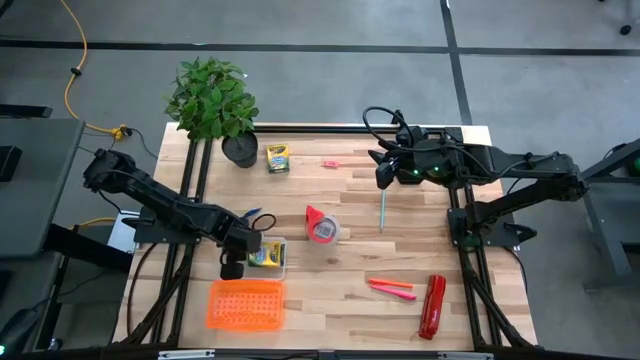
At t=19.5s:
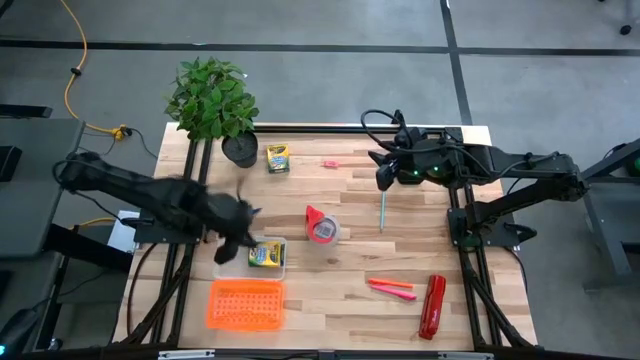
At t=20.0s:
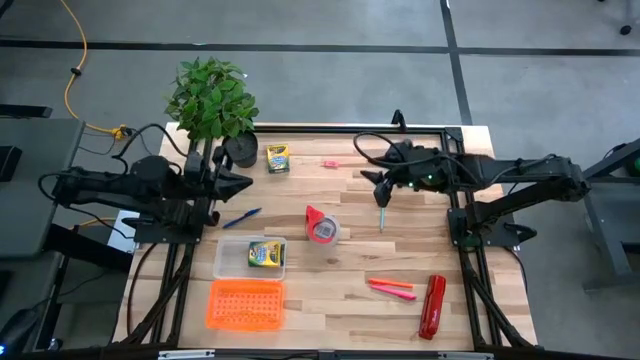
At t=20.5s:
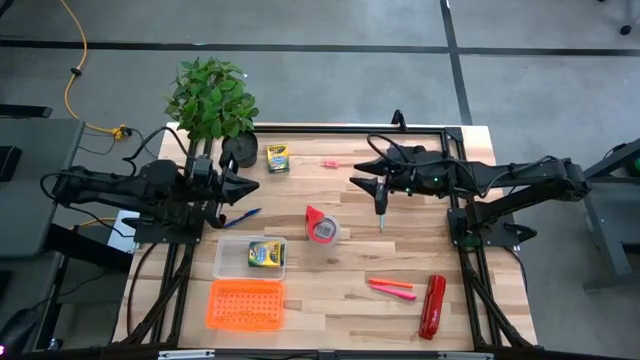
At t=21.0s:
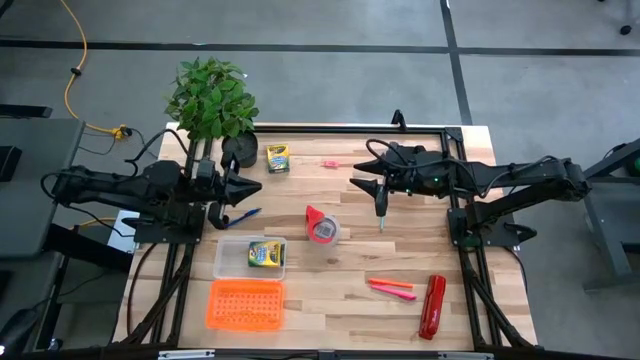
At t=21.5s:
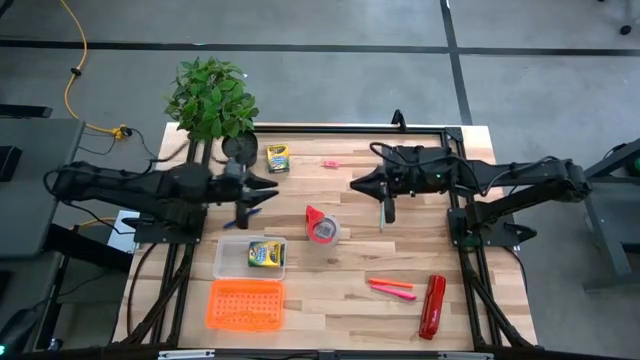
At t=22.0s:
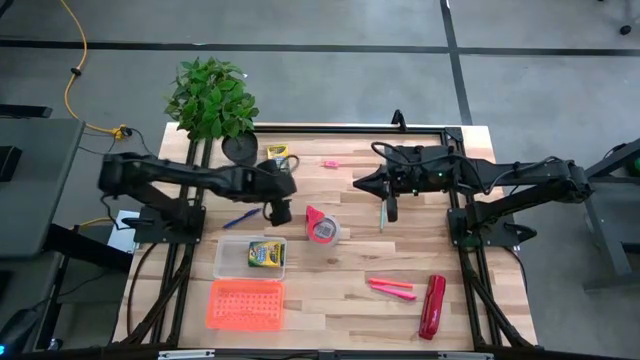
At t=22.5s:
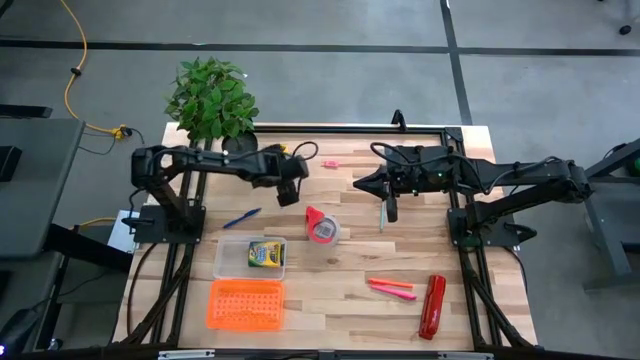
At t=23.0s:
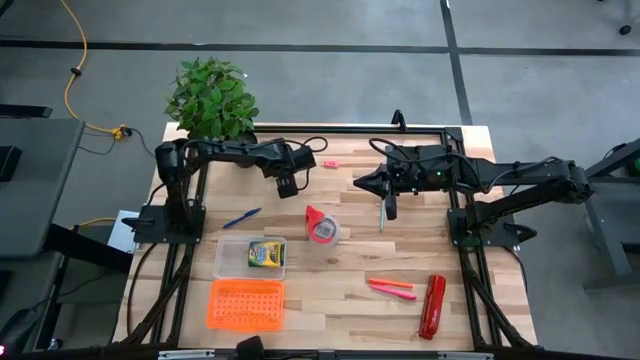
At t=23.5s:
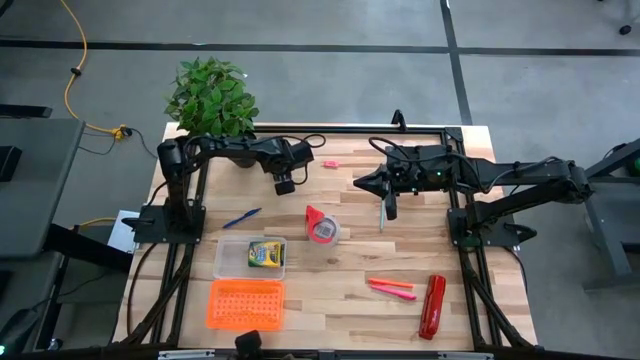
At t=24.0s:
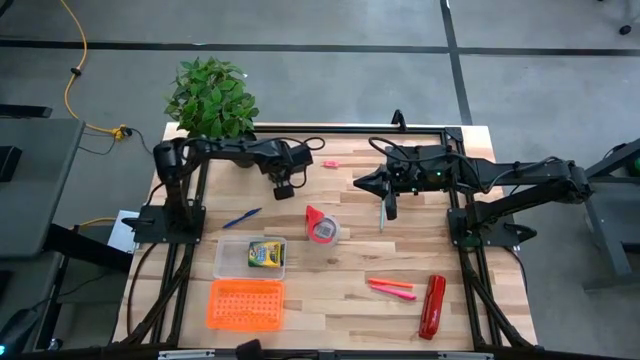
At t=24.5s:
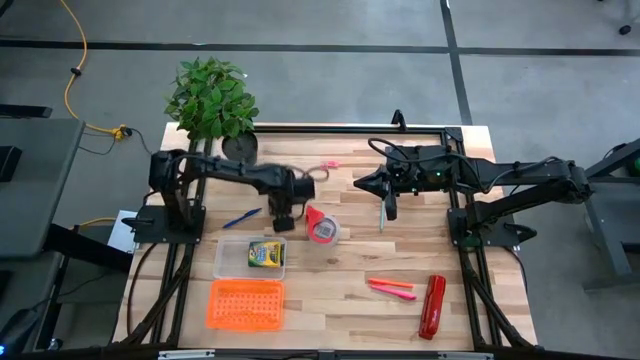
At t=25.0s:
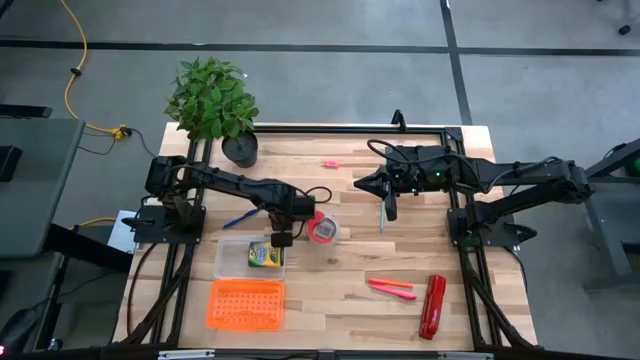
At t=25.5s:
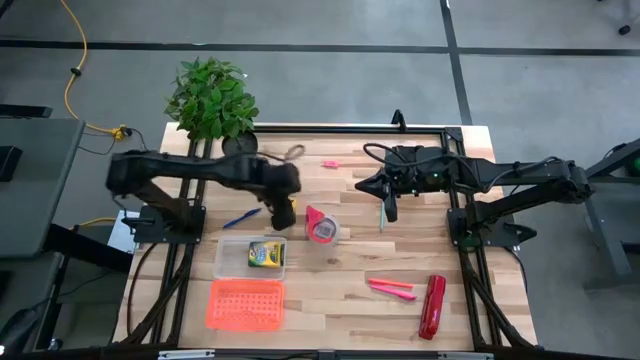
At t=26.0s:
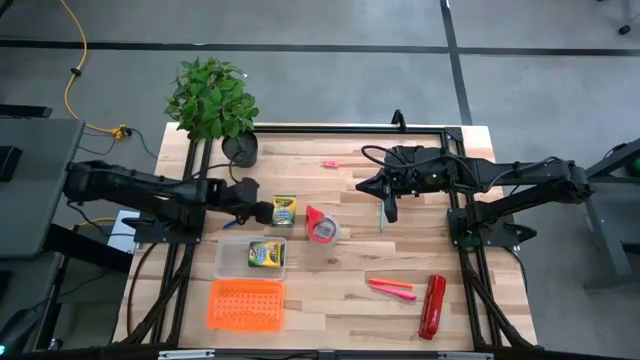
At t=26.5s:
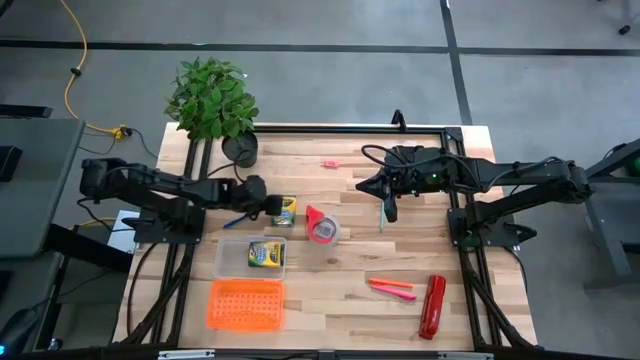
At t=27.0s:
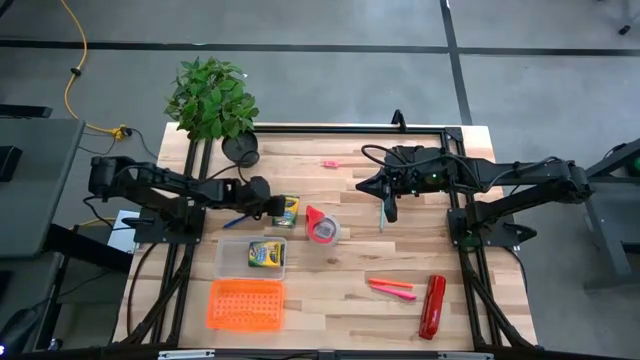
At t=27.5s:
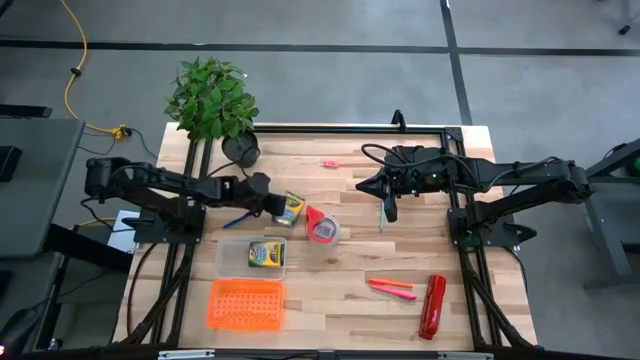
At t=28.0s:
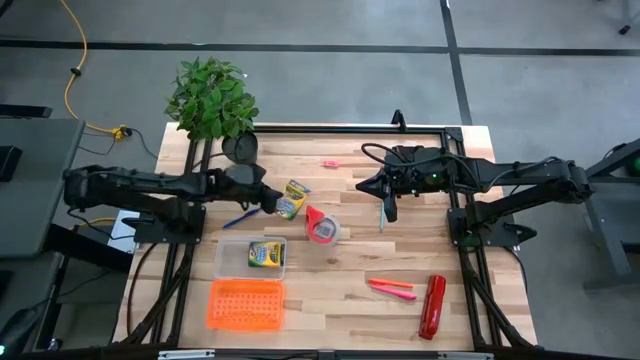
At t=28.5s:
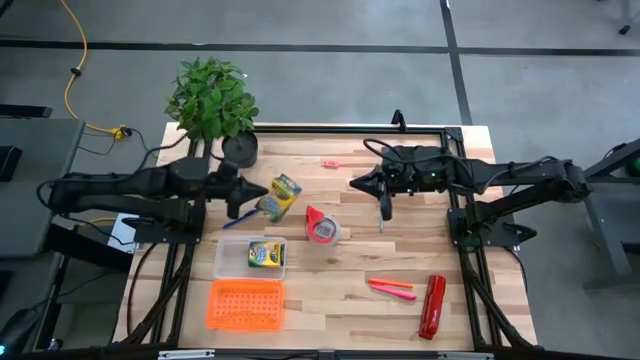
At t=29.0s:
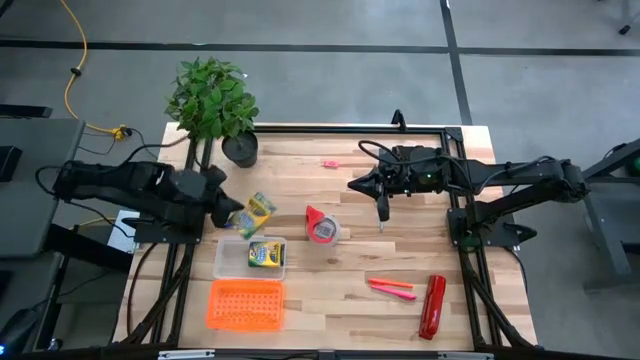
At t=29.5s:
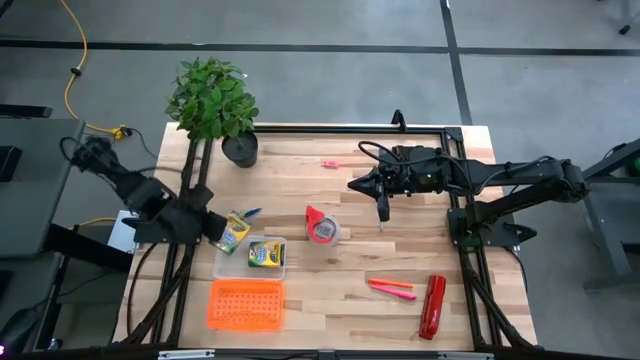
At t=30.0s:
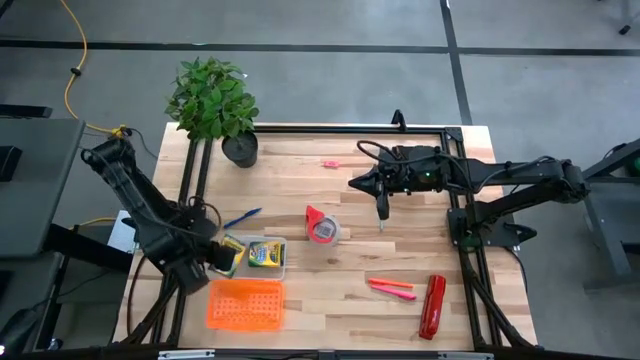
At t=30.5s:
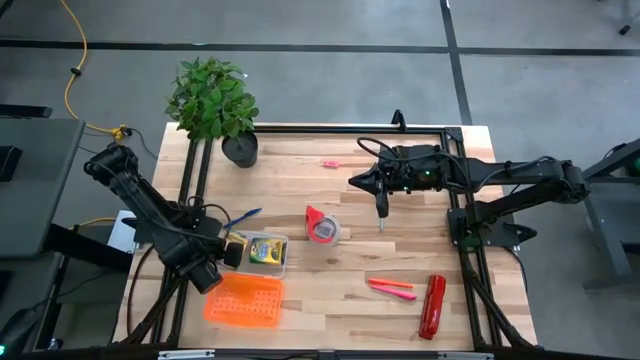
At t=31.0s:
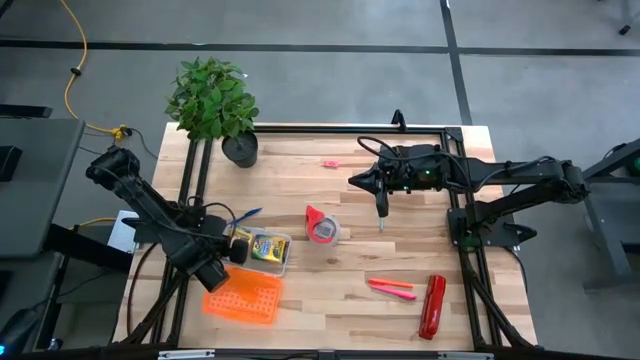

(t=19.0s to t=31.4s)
Task: Pack school essentials
Put the yellow crayon box into the orange supply box

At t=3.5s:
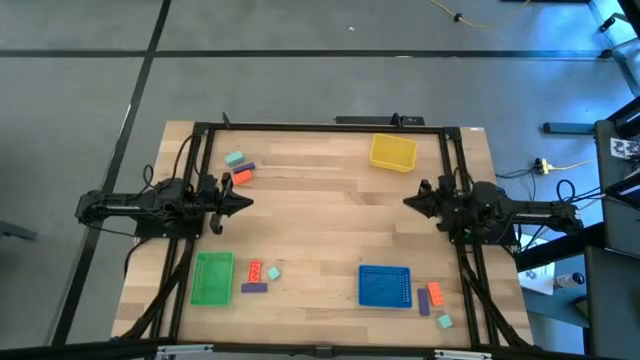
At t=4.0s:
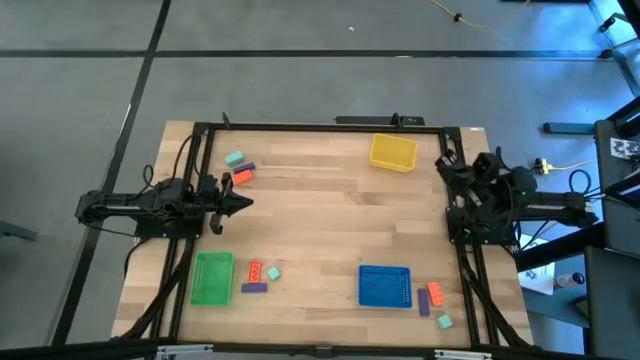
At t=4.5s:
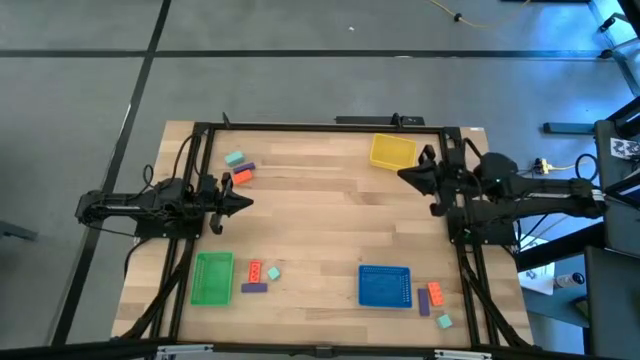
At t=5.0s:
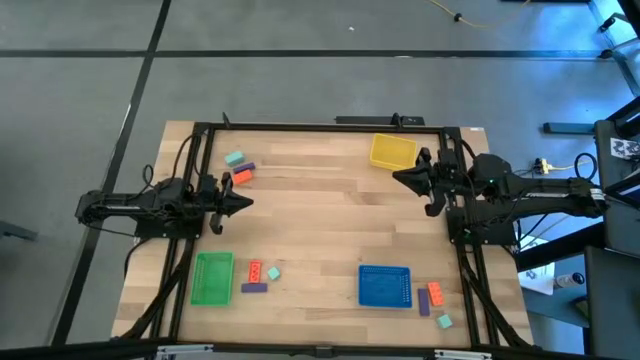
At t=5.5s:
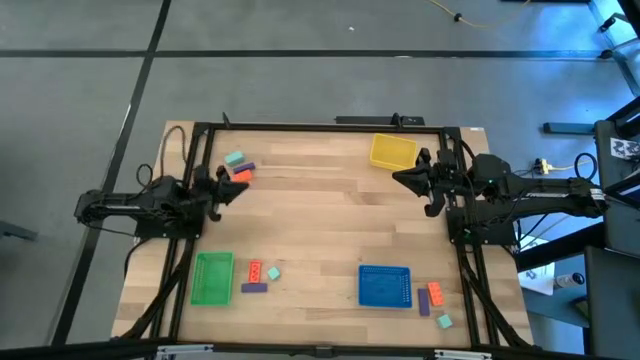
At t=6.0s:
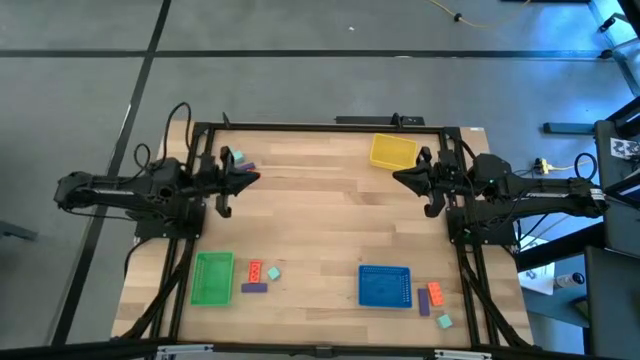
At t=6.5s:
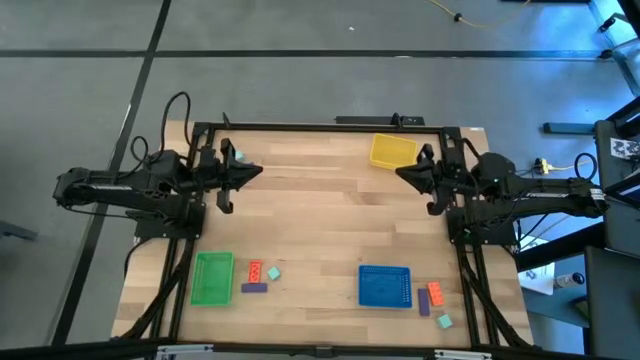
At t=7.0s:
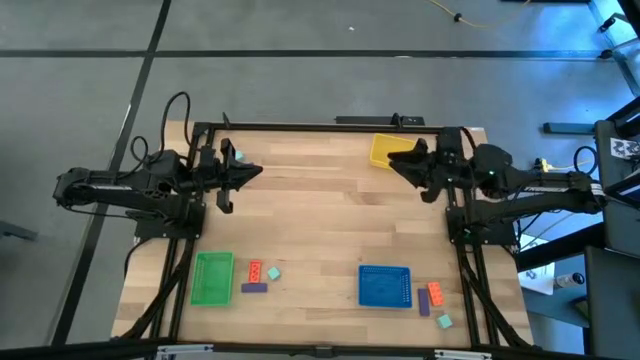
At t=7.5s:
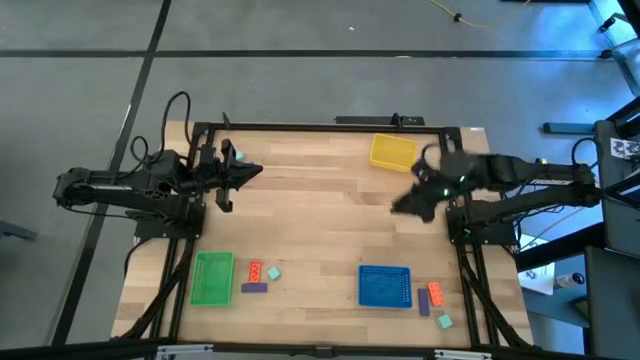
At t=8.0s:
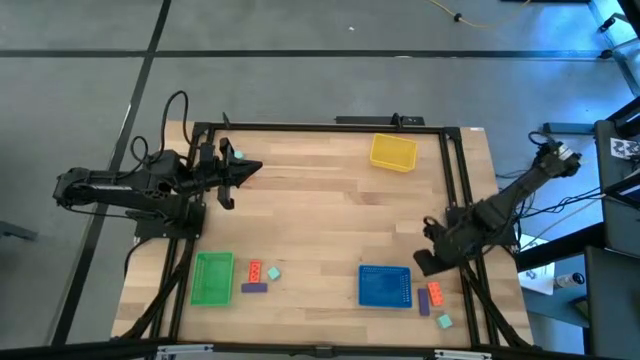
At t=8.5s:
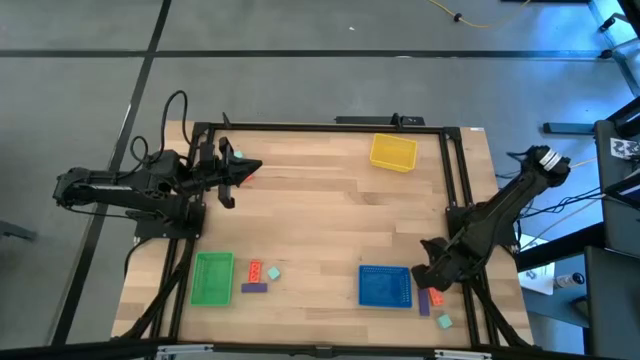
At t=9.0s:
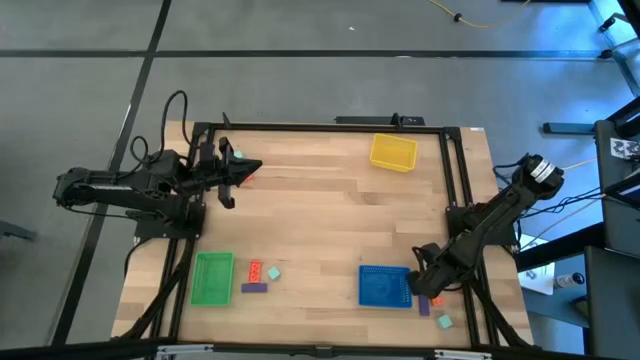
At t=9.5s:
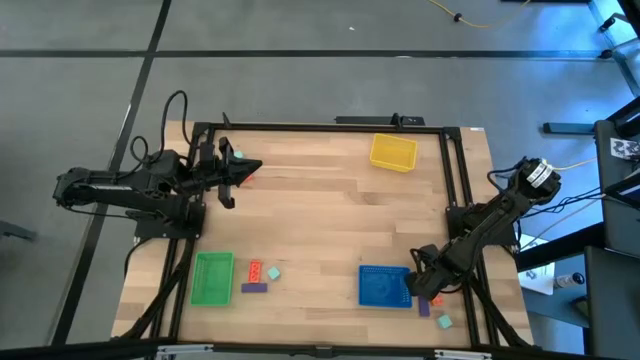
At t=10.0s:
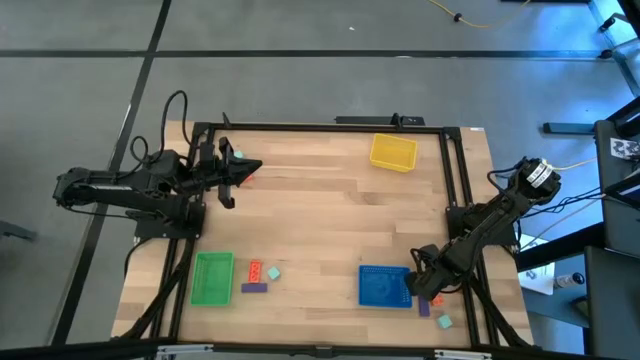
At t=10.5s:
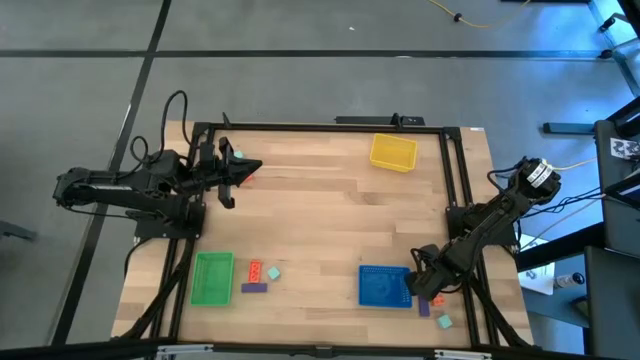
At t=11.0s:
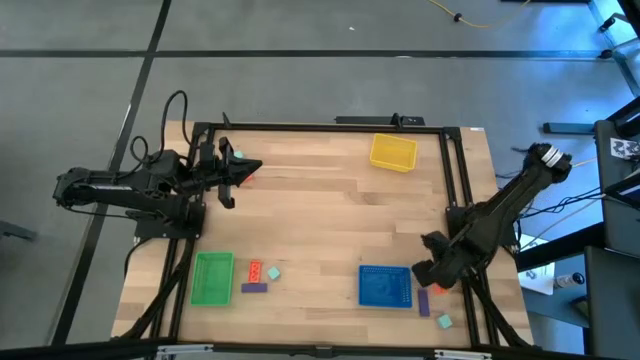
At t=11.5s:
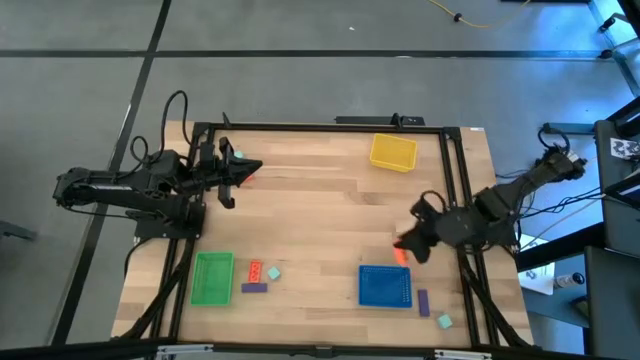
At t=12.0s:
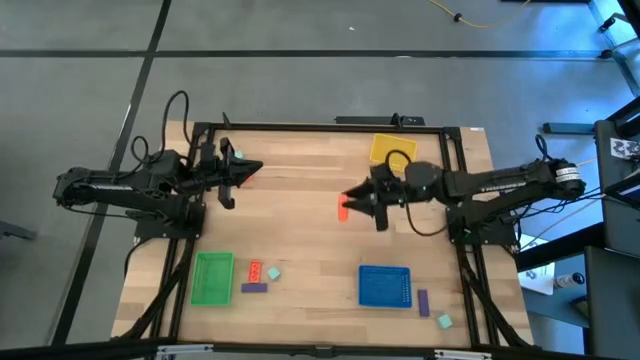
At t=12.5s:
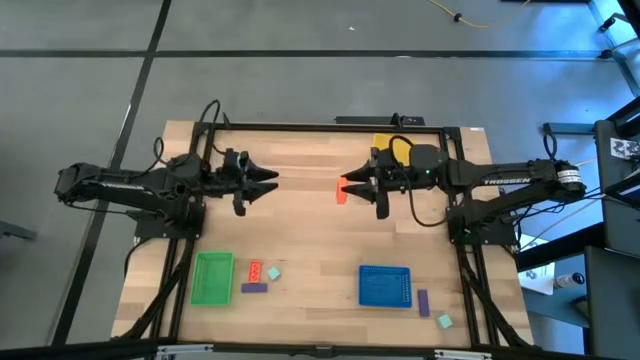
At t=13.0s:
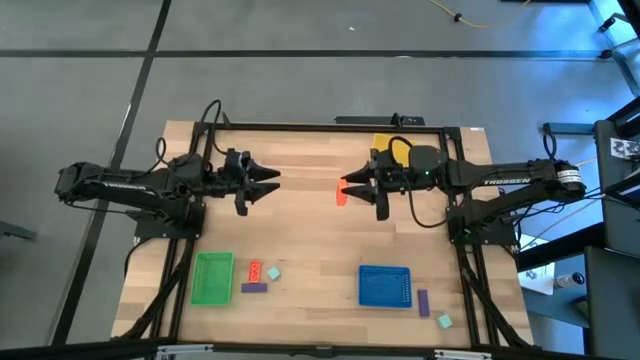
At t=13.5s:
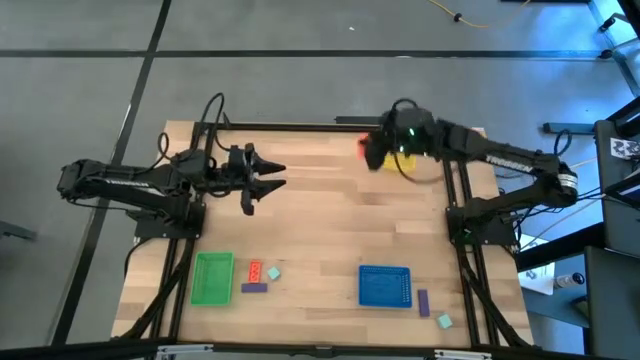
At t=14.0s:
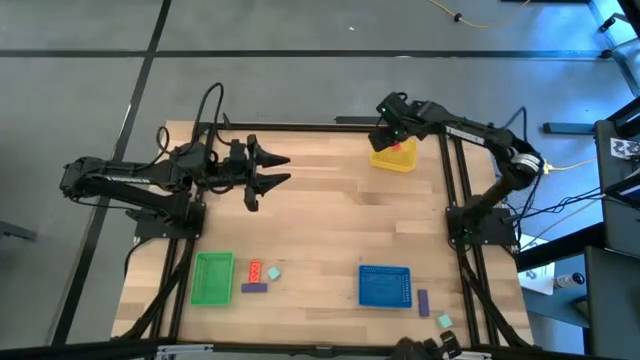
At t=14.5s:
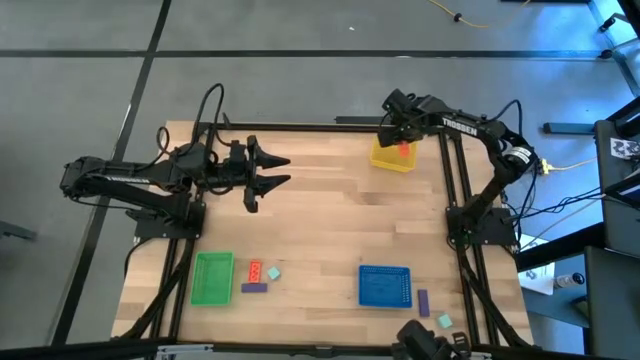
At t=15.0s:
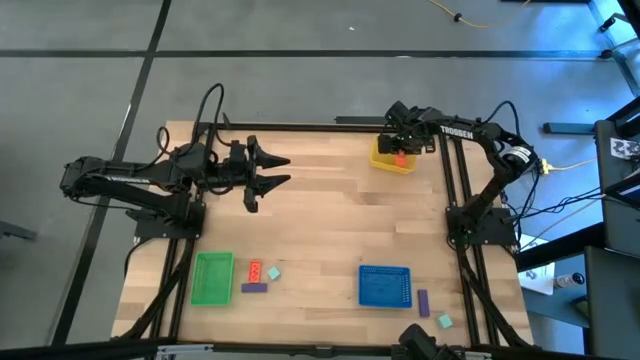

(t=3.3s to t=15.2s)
Task: Sort & place blocks by color
Put the bottom right orange gamepiece into the yellow bin
